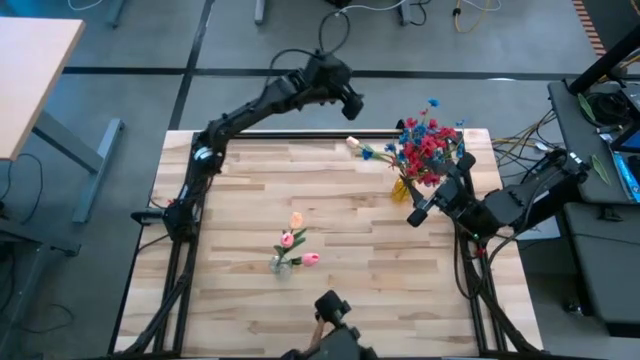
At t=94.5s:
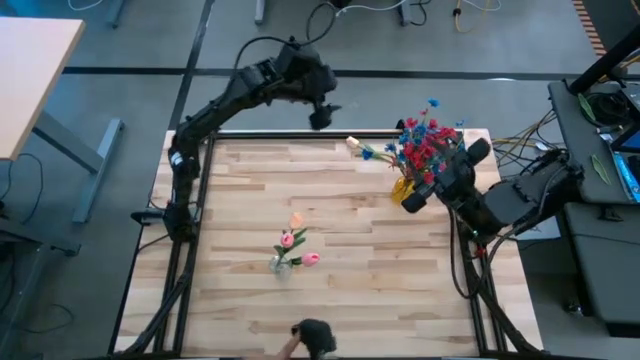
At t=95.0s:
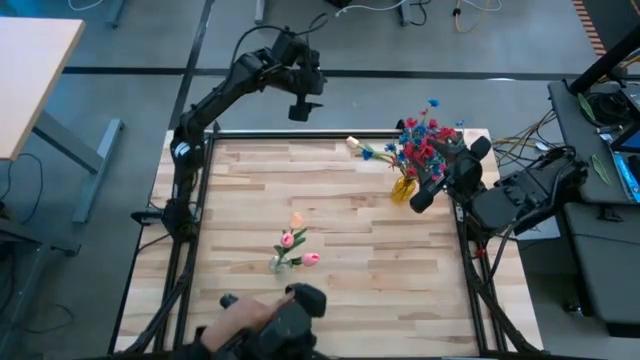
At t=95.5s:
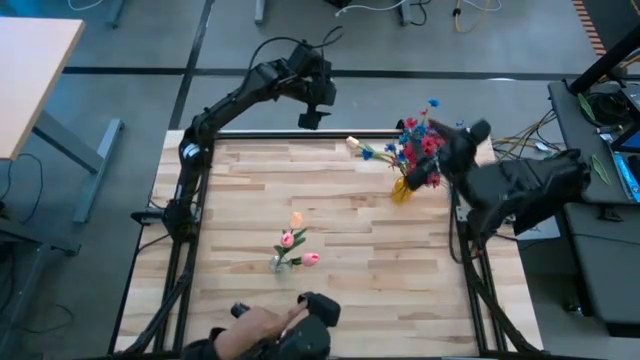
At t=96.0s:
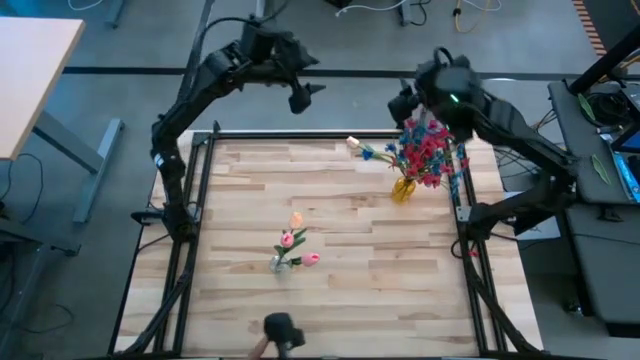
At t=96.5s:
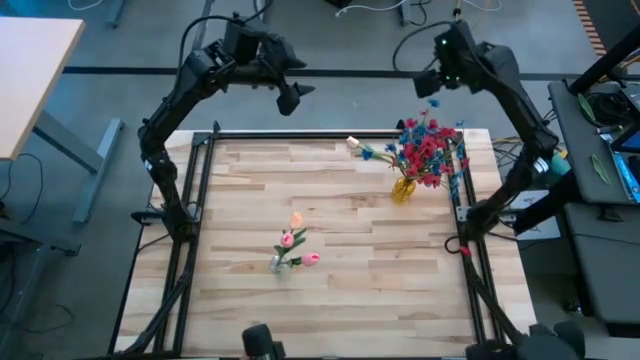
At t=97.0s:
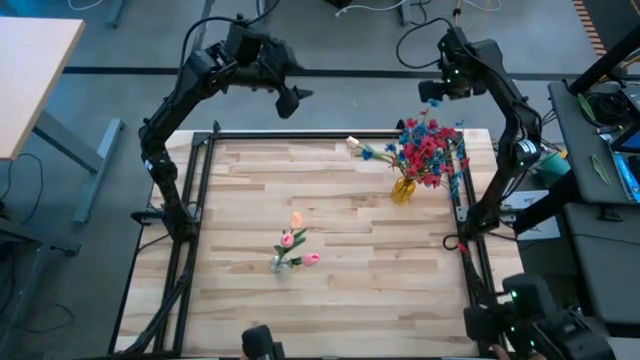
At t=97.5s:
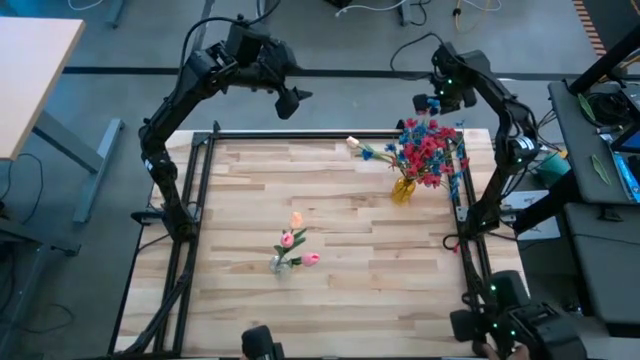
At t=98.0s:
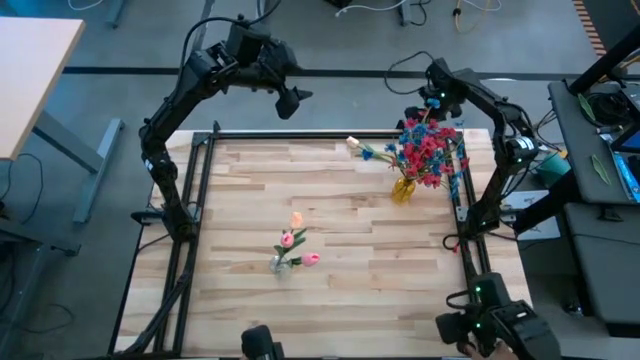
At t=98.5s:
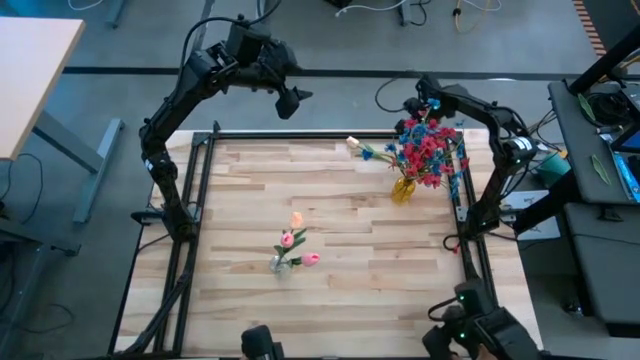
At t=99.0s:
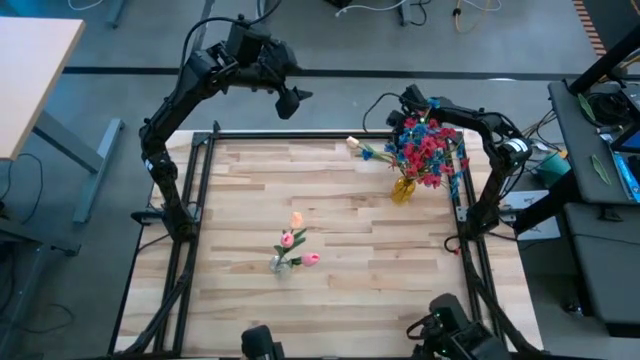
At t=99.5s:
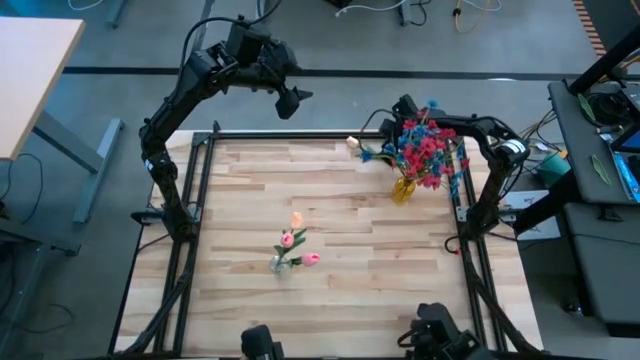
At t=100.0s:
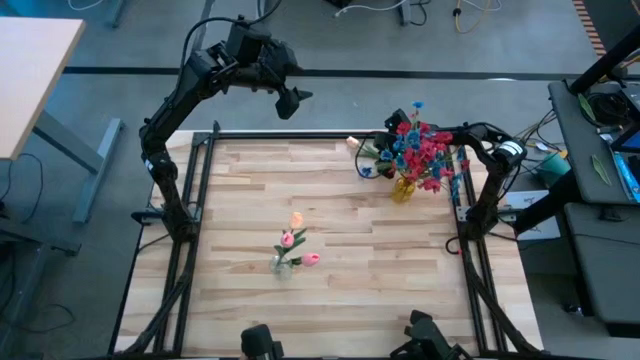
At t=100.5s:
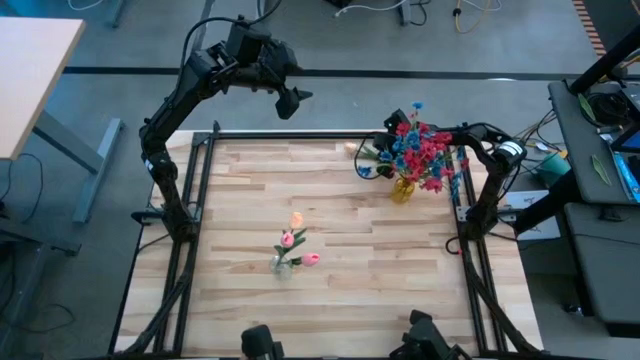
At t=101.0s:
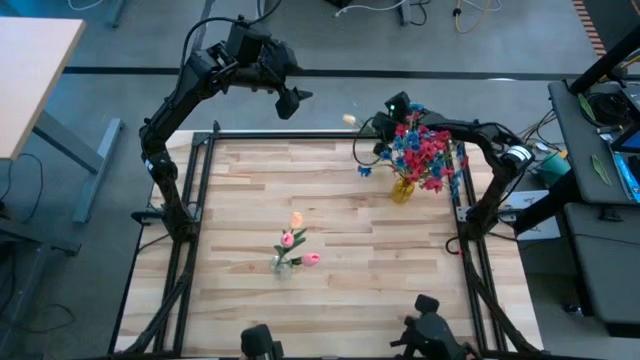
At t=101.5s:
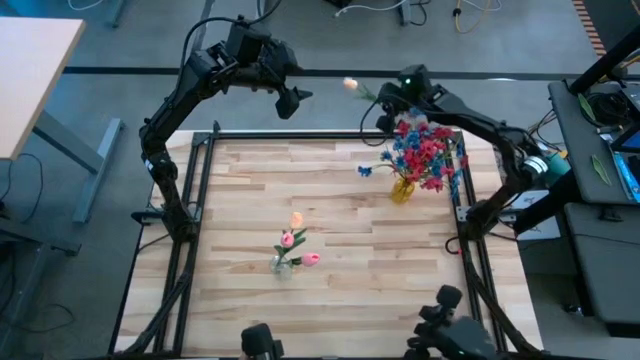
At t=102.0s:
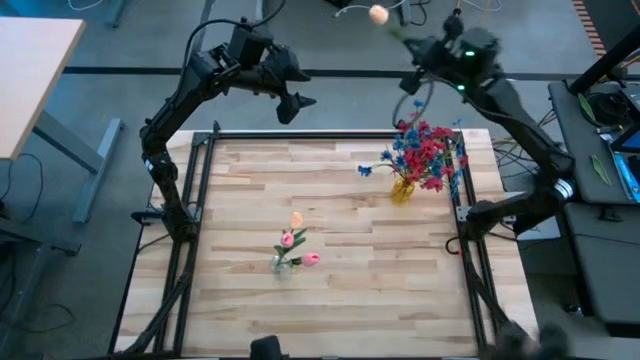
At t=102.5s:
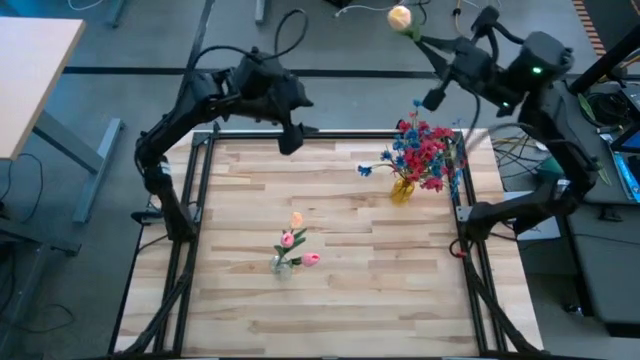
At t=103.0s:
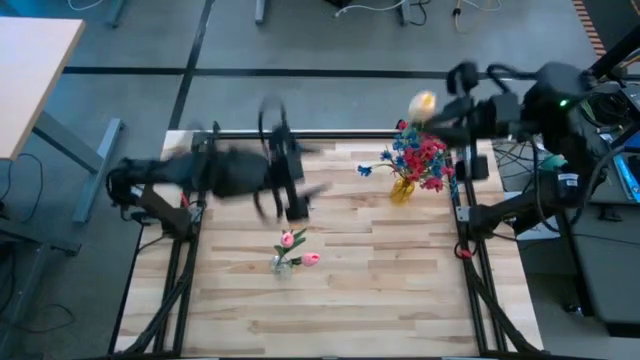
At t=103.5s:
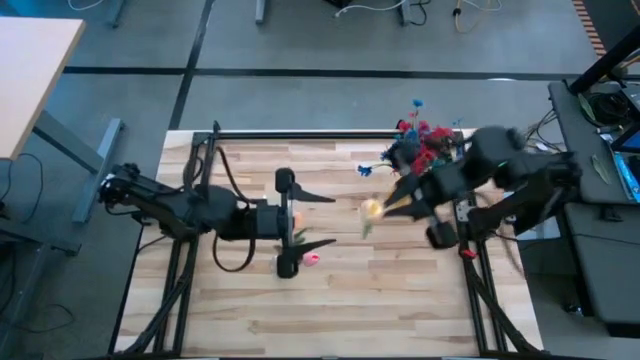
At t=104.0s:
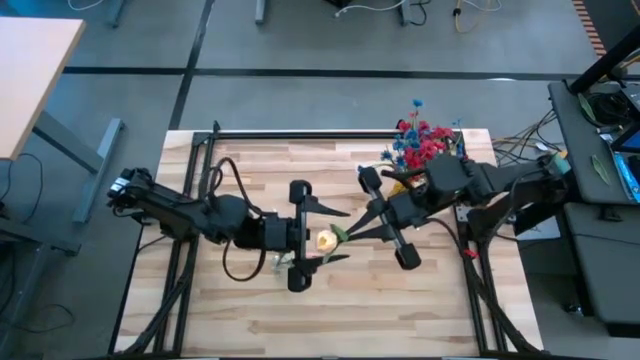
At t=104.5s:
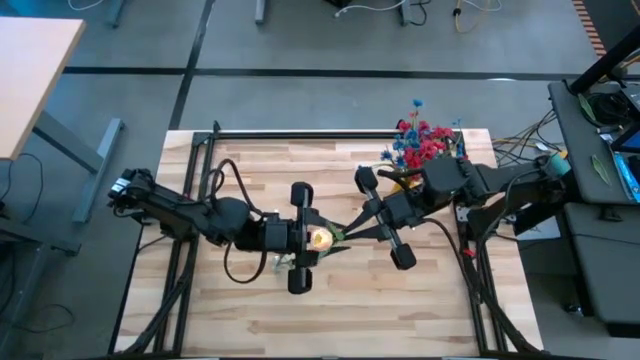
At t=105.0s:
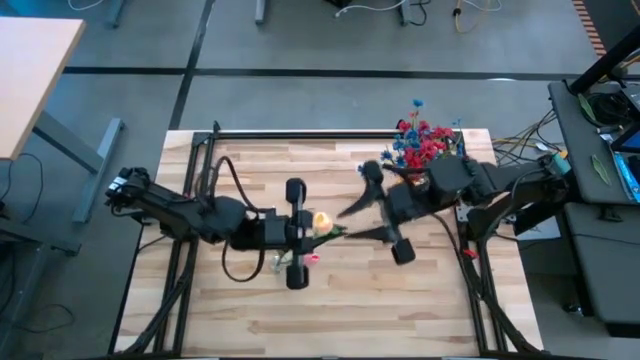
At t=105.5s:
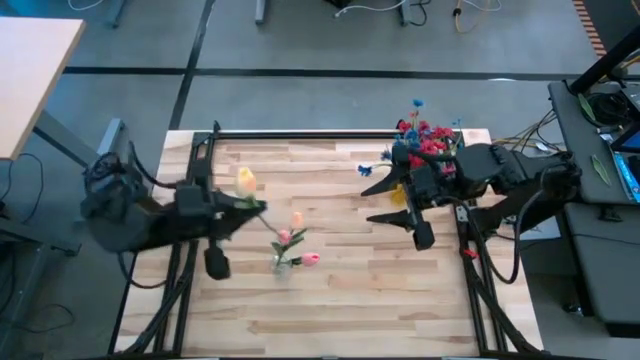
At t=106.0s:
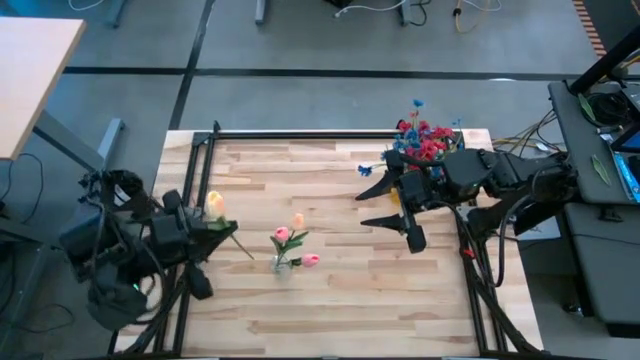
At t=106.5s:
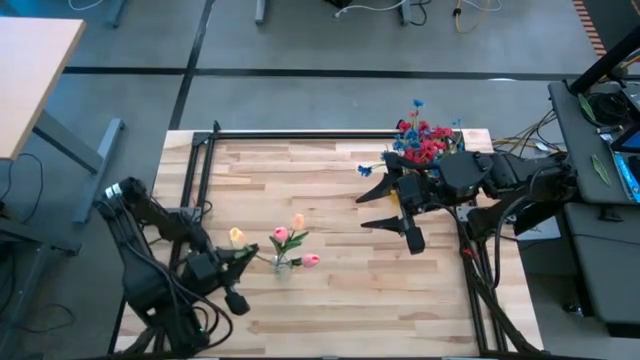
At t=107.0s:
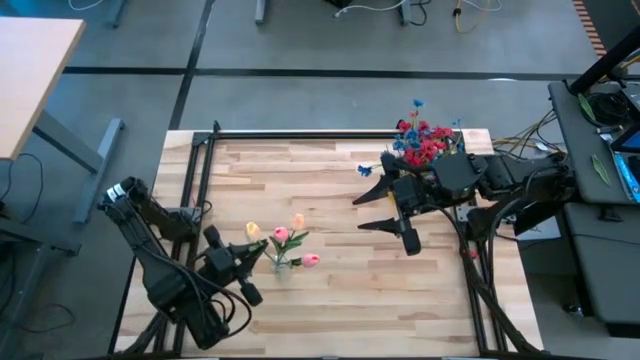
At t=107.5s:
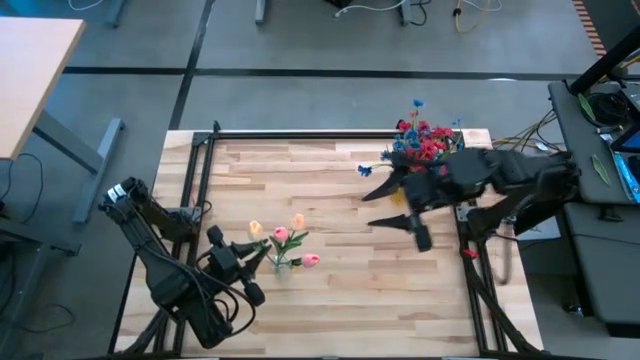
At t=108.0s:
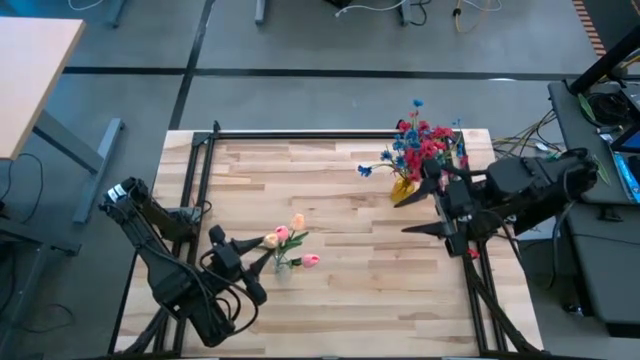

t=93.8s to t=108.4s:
Task: Sort flowers into vase by color
Put the yellow tulip into the transparent vase

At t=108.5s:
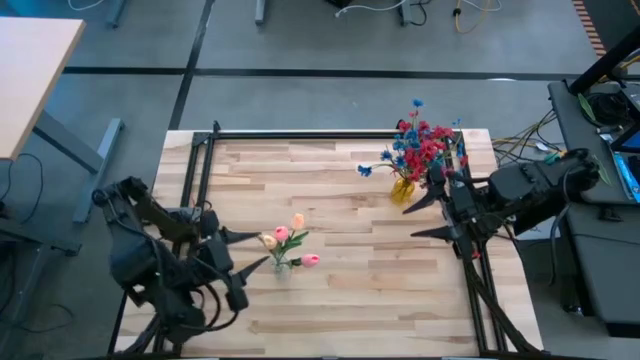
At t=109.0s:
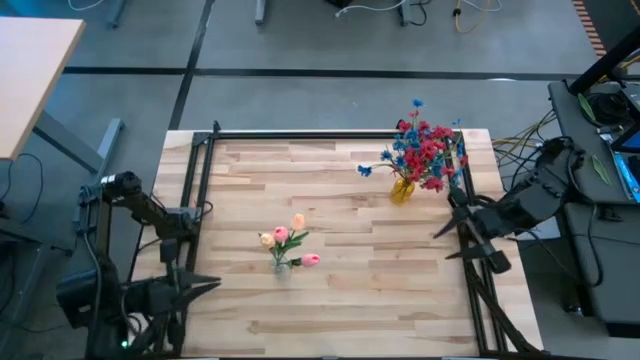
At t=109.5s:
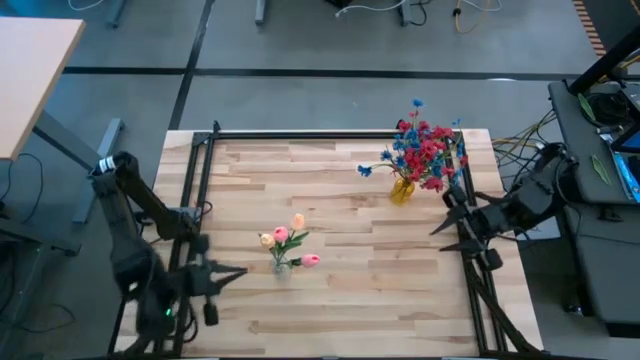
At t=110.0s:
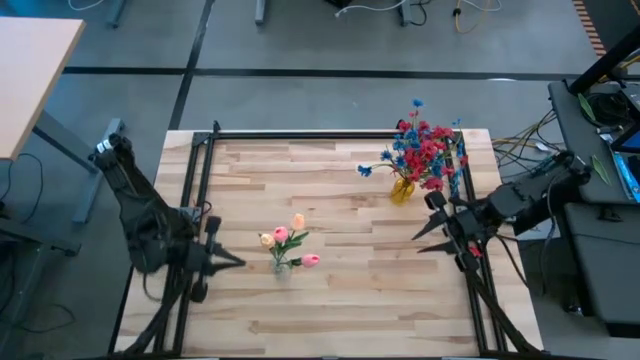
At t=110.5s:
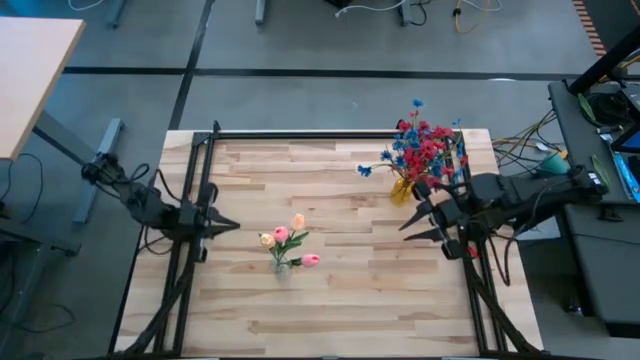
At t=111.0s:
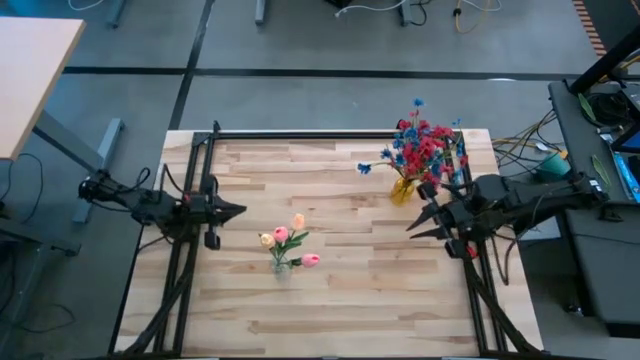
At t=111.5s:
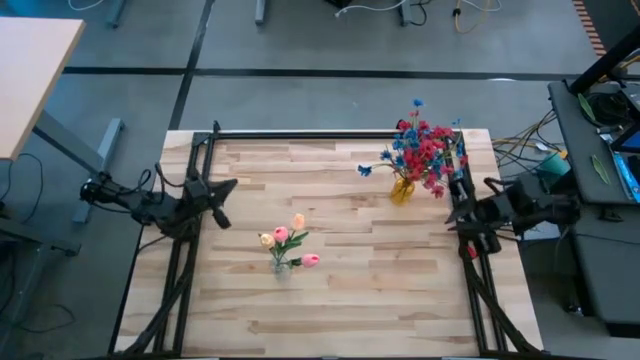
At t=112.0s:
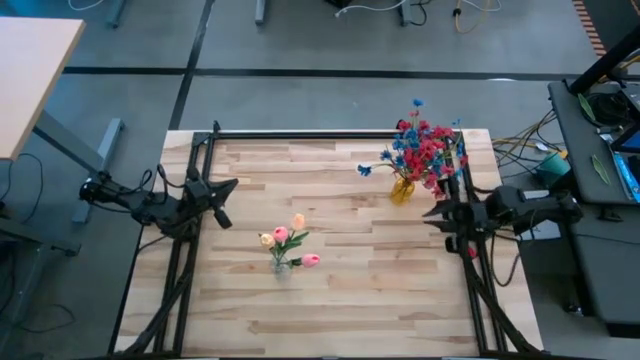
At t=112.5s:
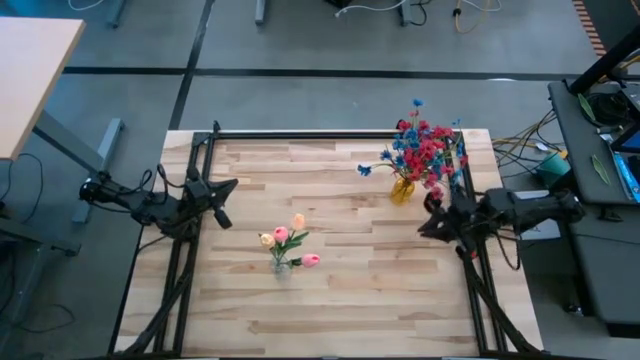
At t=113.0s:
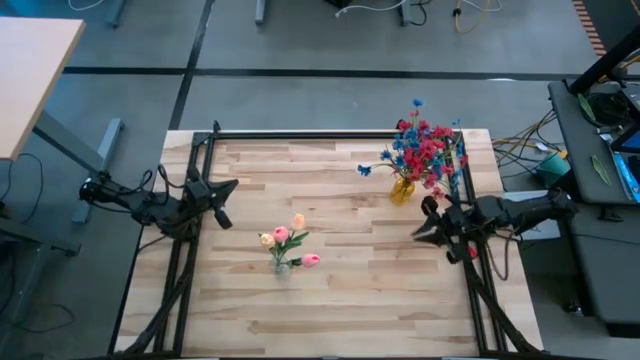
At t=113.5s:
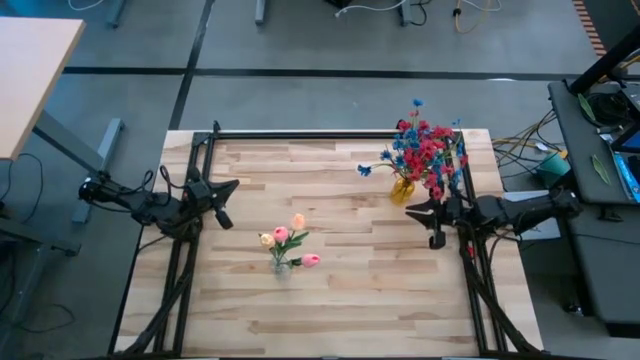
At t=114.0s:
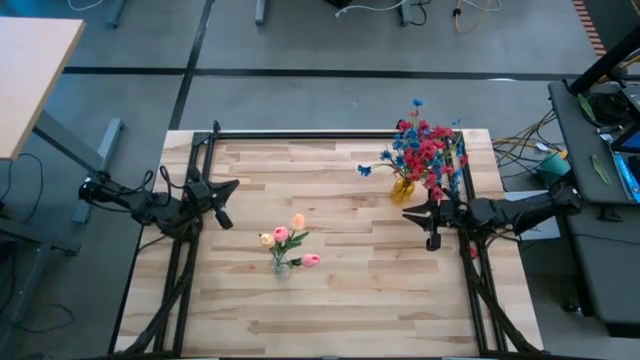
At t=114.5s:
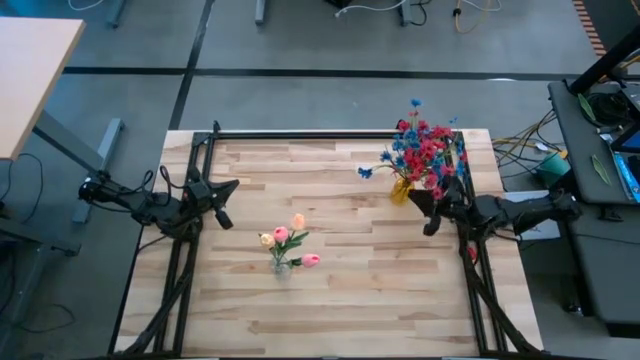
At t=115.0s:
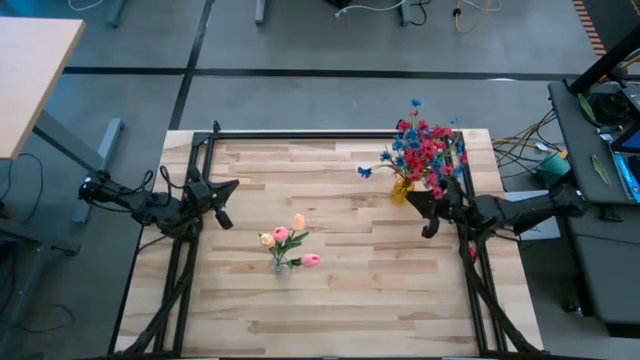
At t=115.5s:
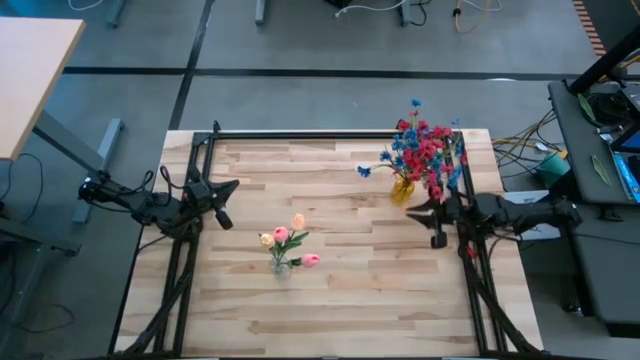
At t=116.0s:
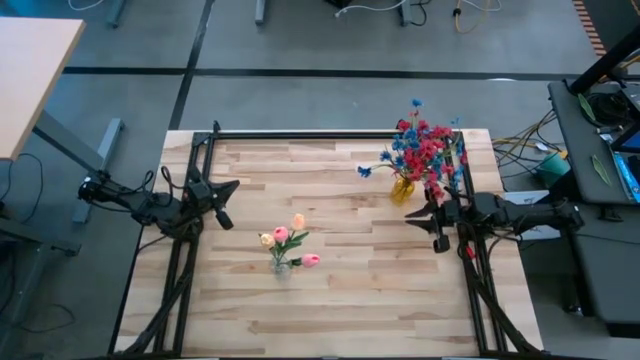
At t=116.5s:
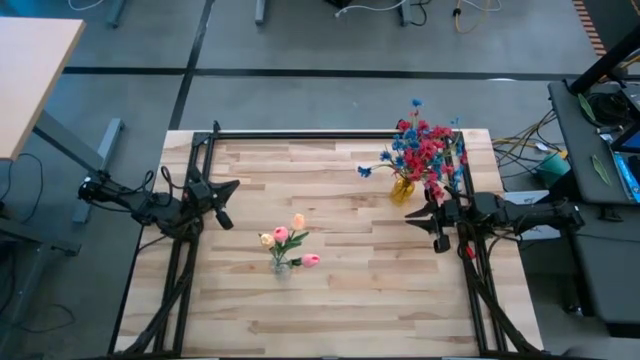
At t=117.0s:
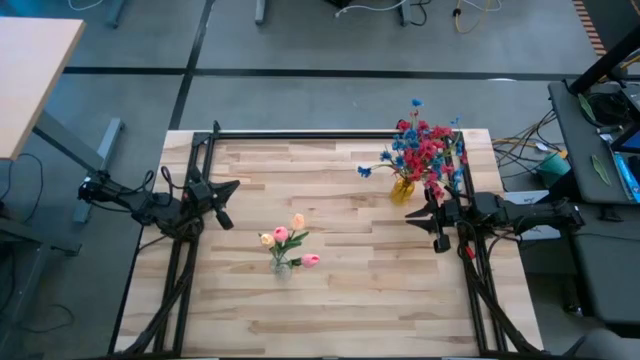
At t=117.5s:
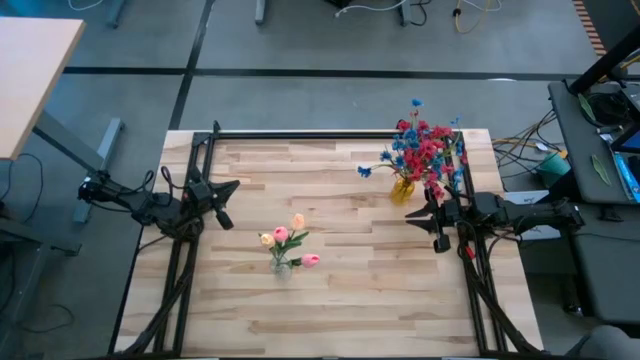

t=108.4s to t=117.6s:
Return to Home Position
